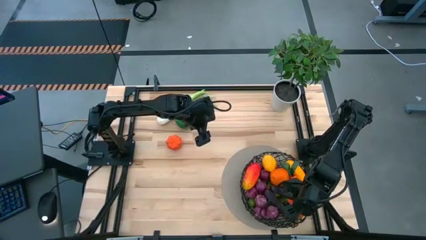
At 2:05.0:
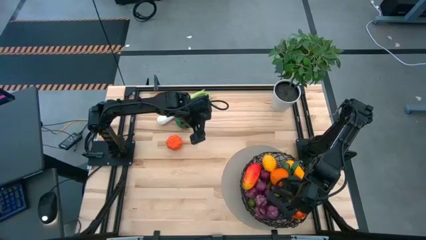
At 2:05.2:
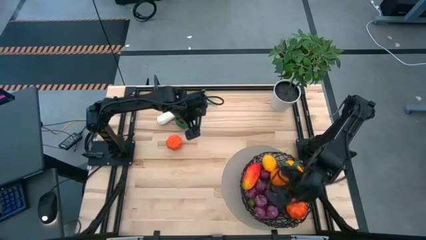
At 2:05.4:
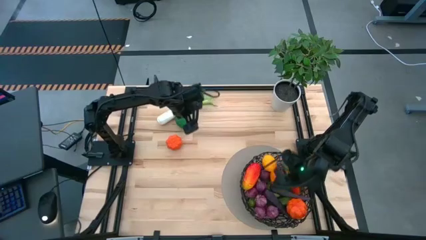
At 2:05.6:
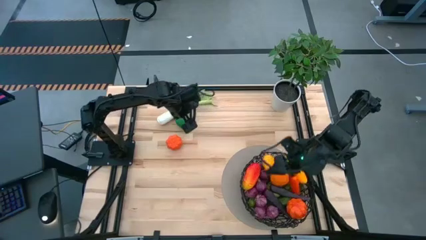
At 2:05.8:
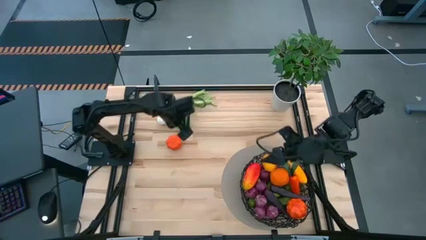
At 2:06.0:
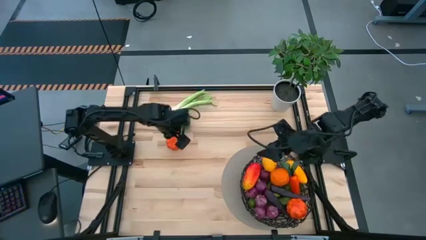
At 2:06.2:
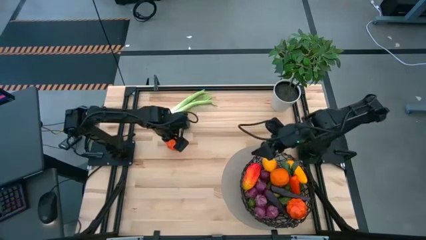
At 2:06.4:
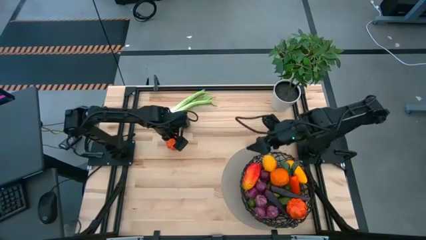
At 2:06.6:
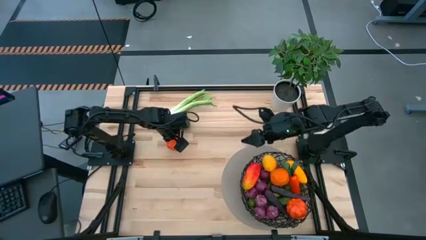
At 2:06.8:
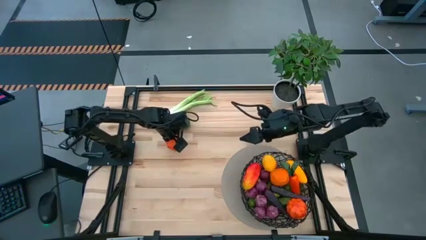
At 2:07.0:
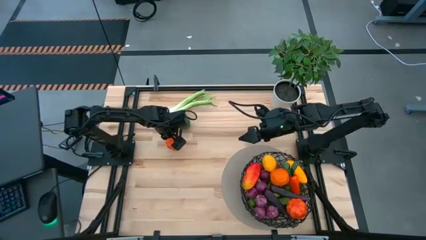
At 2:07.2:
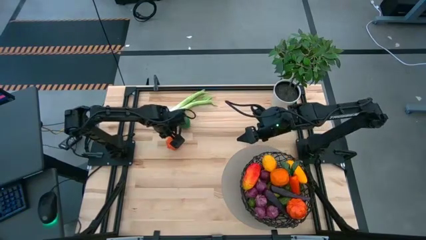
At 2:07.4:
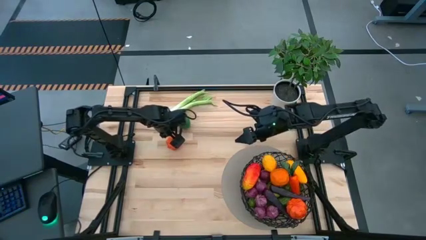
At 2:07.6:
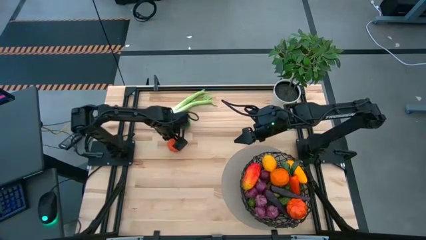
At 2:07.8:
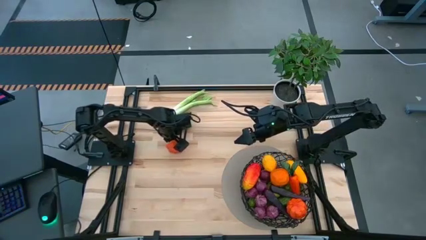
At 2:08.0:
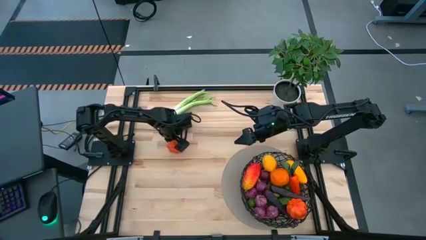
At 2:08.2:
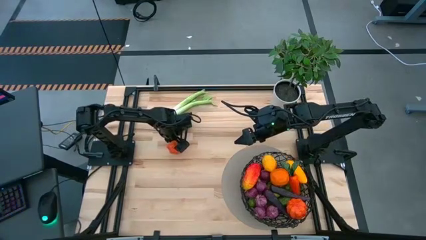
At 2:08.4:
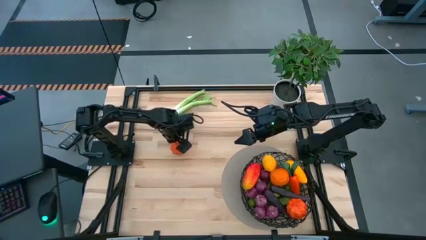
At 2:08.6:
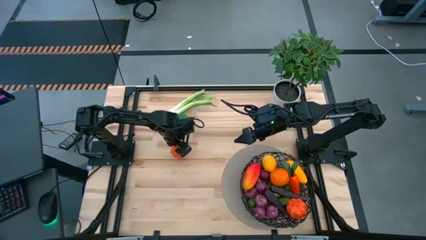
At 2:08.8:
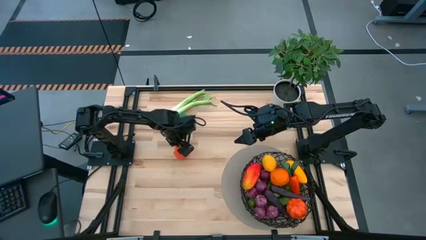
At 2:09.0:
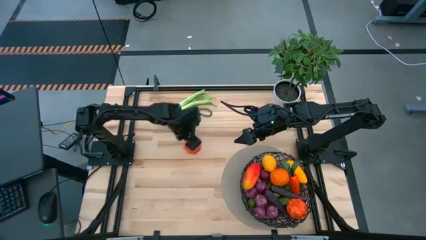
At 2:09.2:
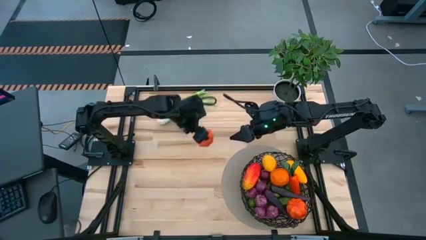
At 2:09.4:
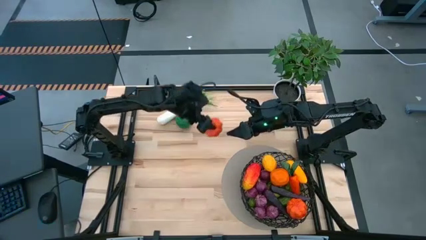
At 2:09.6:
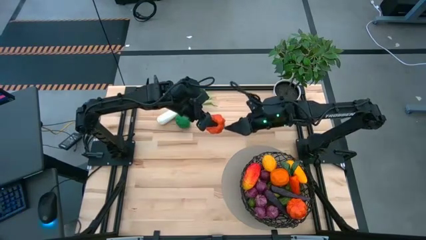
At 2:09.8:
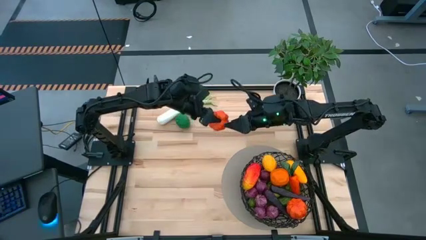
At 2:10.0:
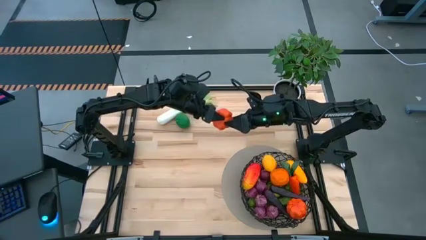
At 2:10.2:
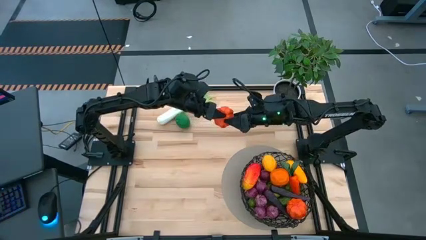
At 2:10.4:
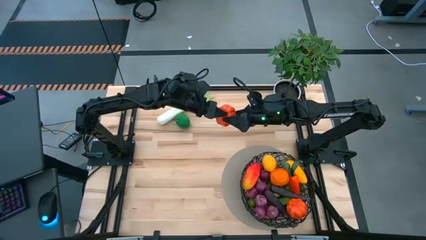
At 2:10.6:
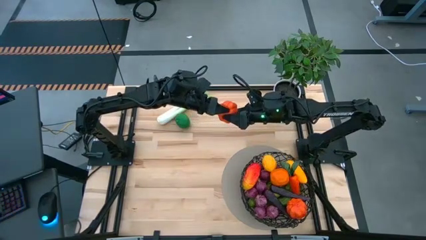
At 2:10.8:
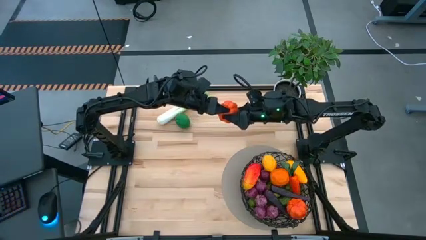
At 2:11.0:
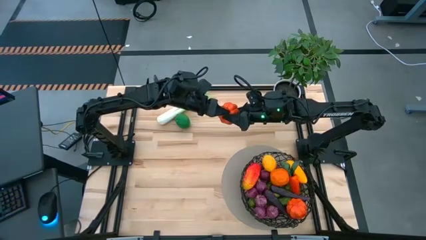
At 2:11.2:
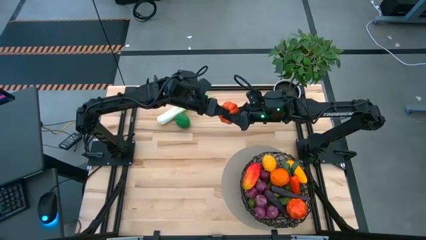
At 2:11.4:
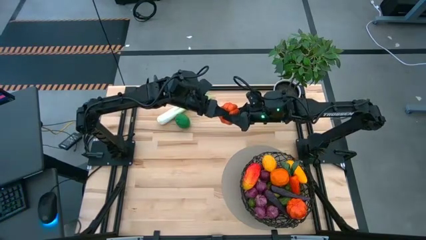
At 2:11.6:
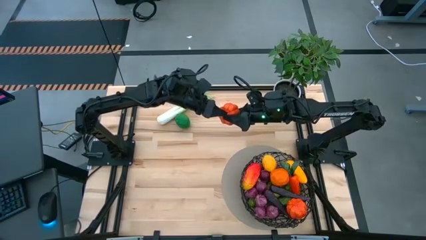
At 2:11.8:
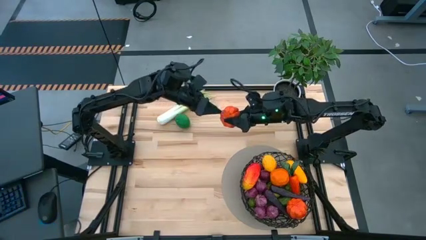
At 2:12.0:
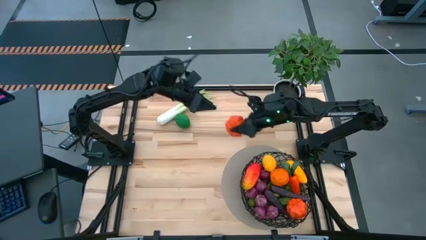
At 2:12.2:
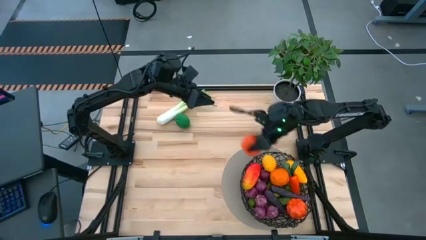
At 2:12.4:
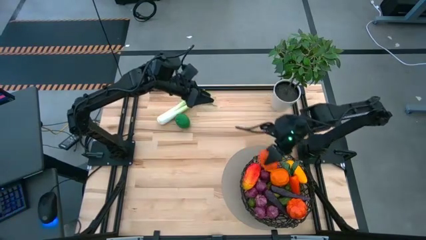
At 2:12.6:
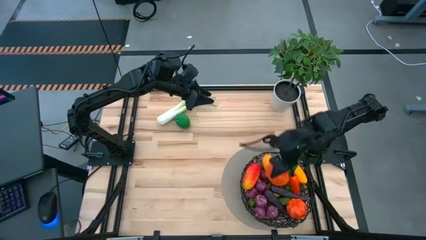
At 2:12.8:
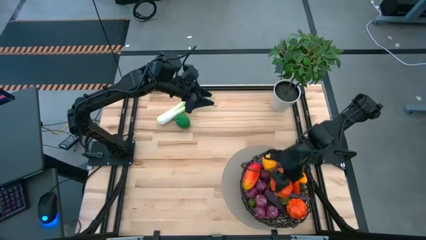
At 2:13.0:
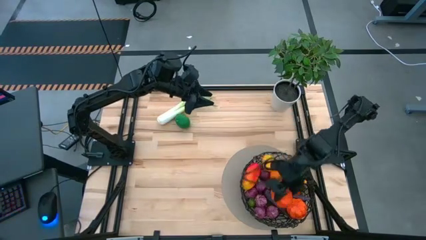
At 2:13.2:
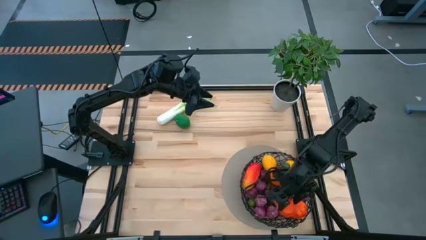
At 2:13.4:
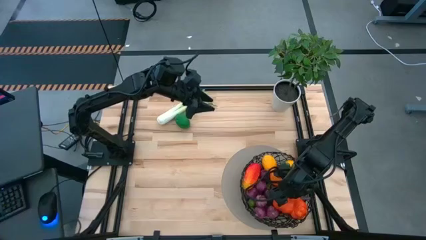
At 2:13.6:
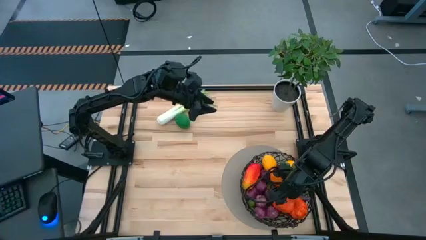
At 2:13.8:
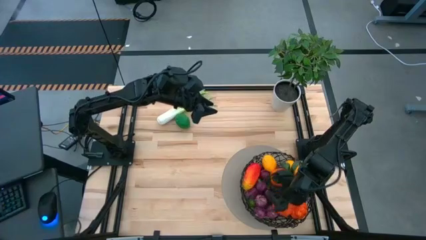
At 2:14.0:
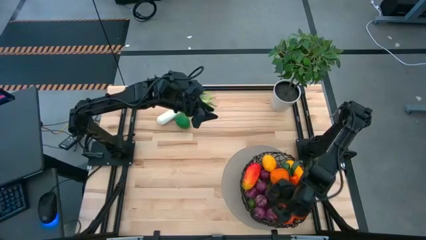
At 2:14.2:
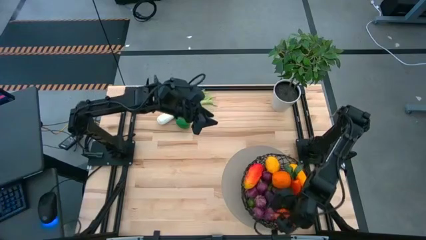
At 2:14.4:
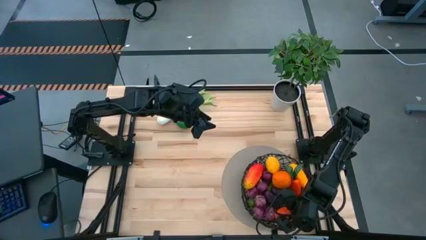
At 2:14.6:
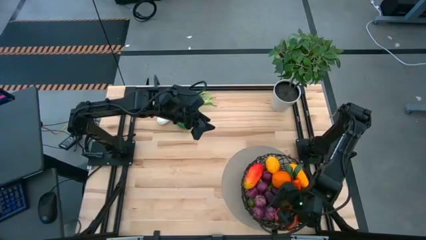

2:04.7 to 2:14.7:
Task: Build produce basket
Put the orange squash into the black basket

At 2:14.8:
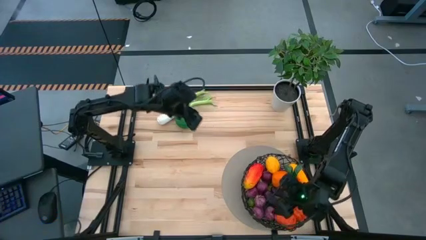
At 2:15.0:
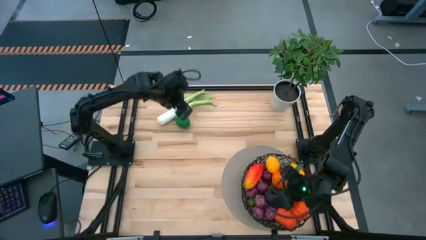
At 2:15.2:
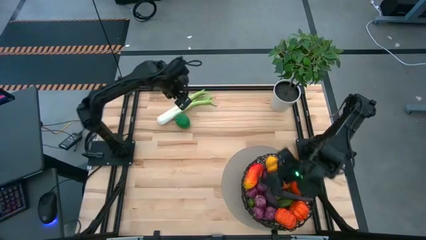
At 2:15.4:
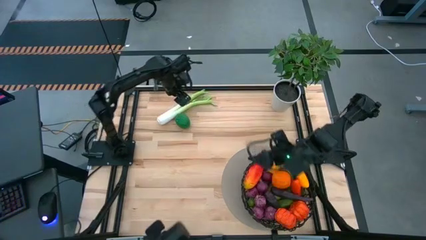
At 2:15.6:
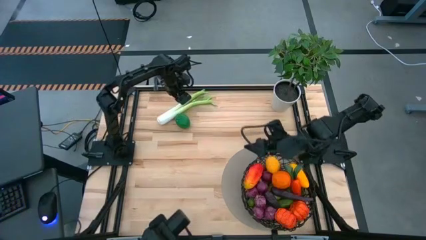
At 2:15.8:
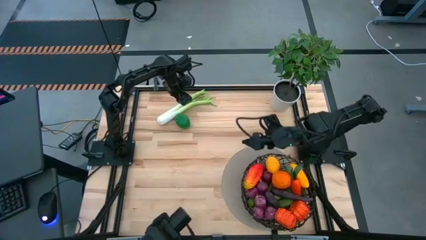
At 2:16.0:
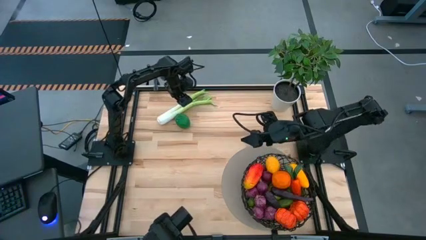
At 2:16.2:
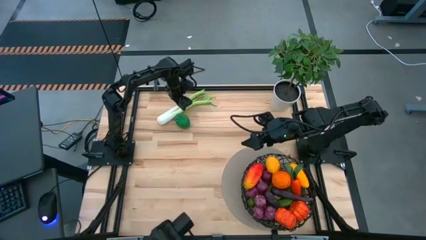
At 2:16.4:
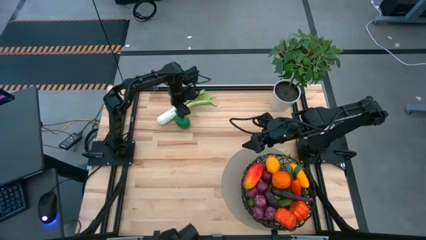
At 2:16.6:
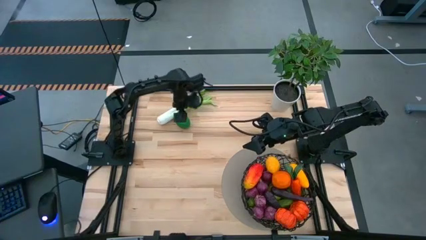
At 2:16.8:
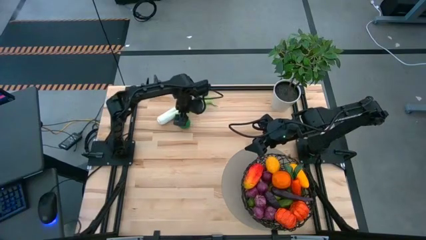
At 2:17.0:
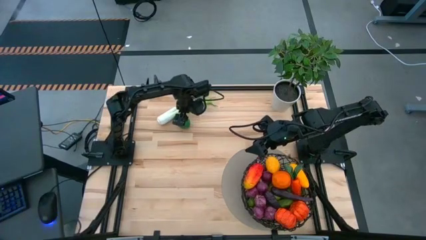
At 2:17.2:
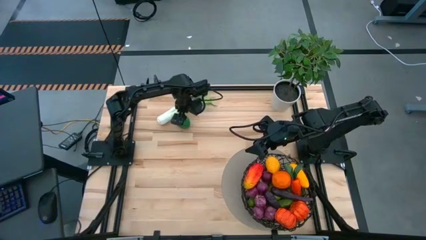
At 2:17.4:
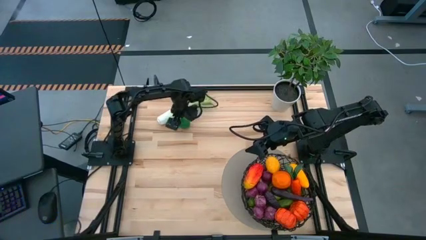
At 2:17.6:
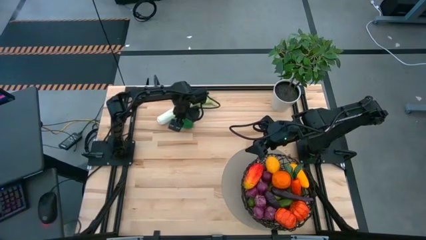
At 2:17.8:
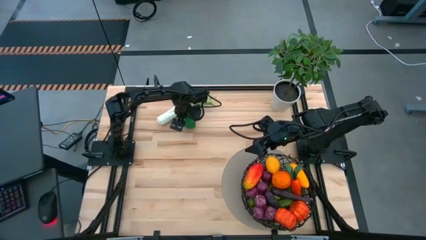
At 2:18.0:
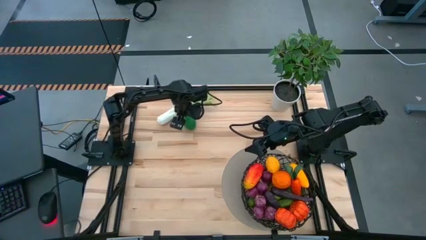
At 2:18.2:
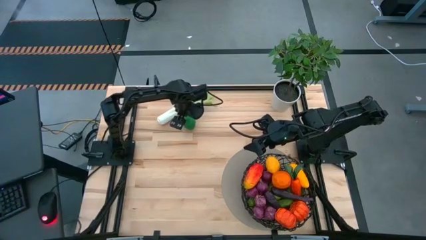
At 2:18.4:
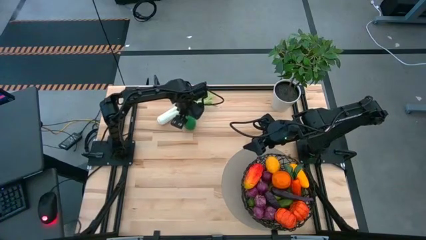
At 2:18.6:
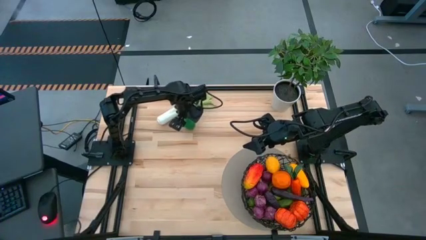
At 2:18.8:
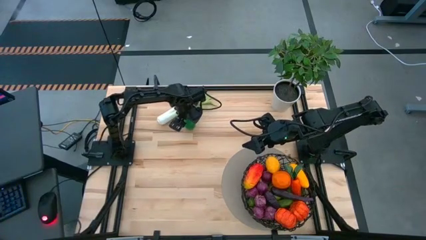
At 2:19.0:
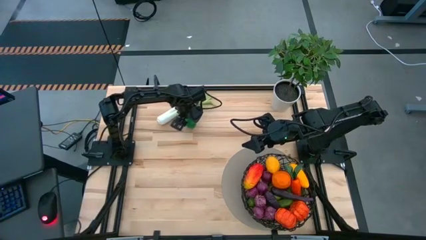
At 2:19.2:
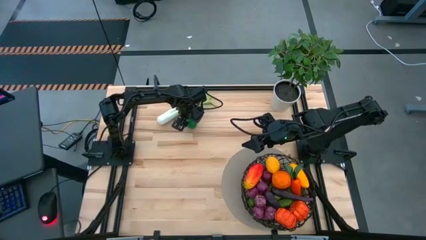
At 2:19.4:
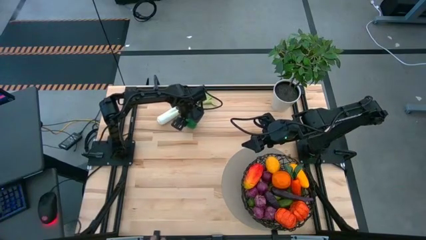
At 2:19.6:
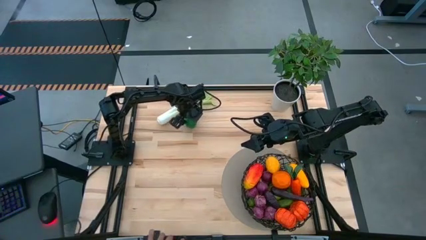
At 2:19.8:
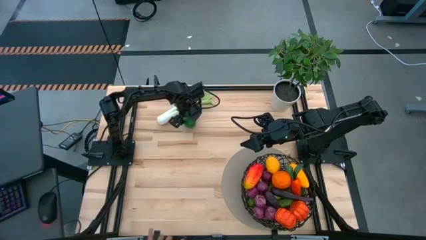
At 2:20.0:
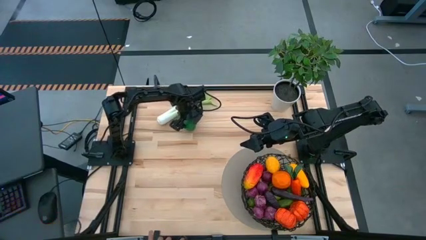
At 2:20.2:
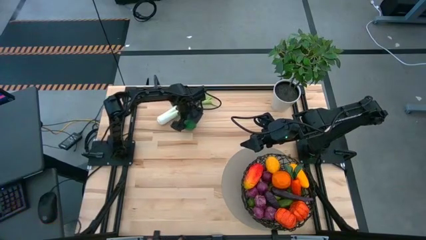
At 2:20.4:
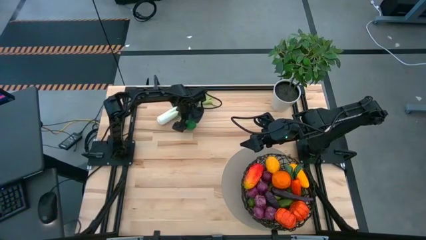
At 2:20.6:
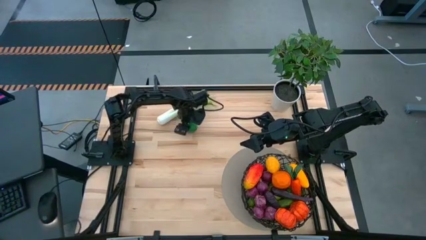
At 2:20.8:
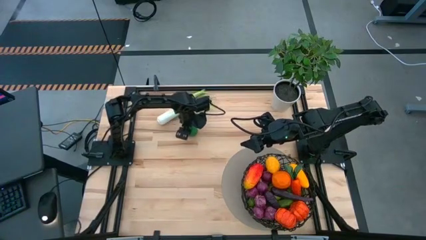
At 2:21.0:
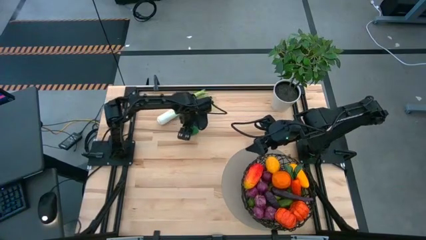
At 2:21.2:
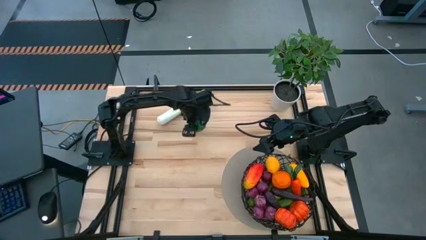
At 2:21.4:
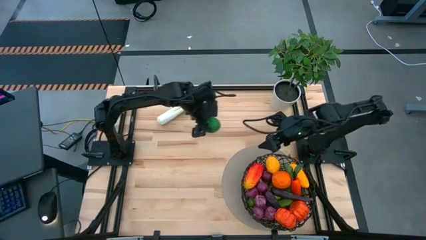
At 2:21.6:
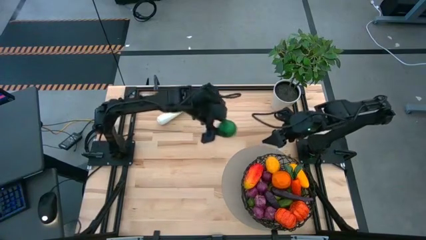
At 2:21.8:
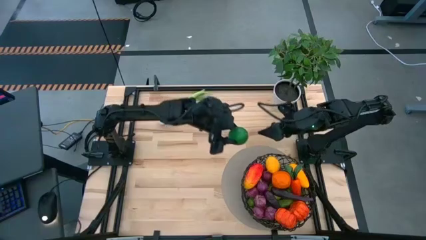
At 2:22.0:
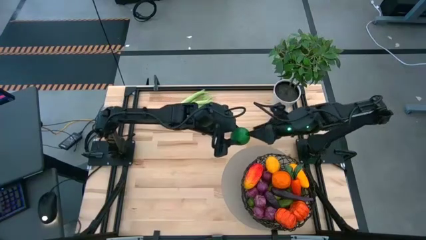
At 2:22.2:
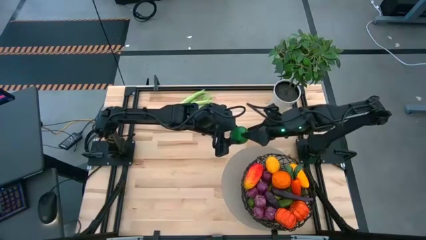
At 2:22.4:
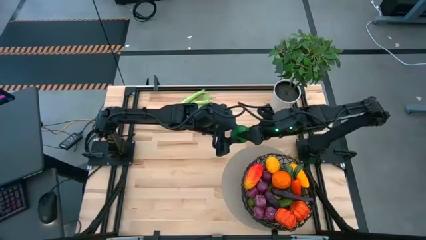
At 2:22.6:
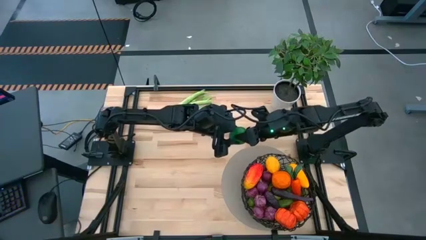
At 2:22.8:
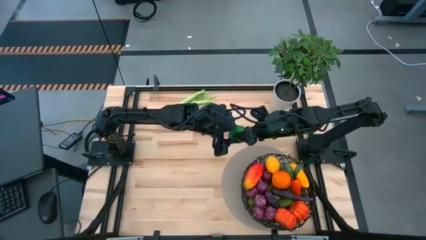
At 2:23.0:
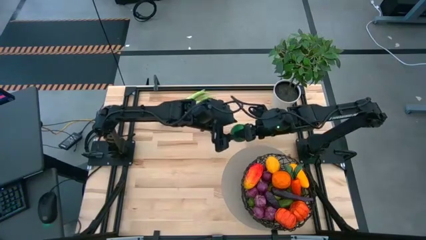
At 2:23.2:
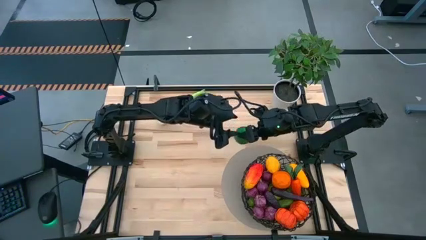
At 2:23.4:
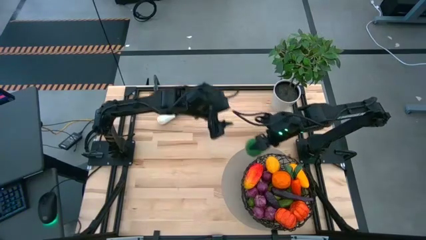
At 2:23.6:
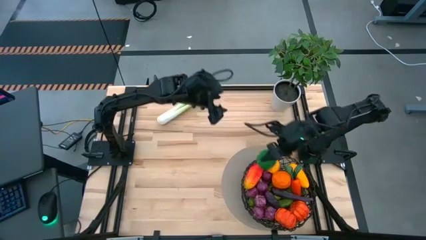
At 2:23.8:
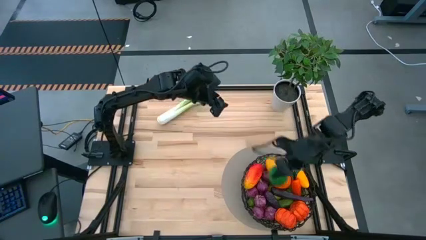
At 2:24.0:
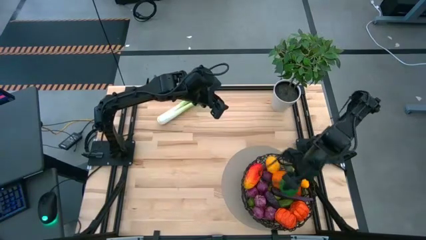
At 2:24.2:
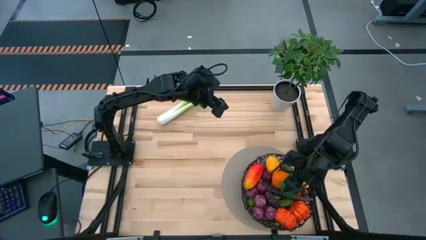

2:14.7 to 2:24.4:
Put the green lime into the black basket
